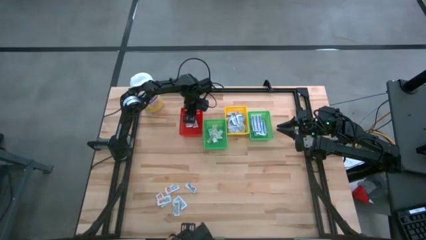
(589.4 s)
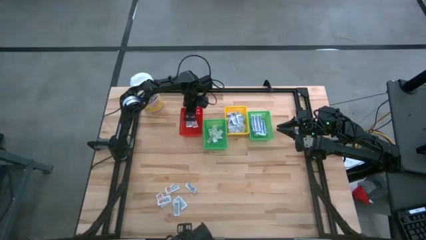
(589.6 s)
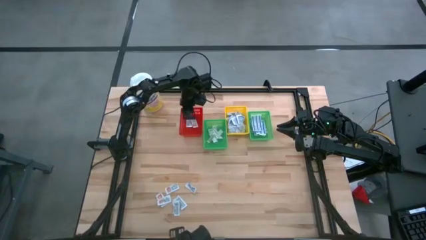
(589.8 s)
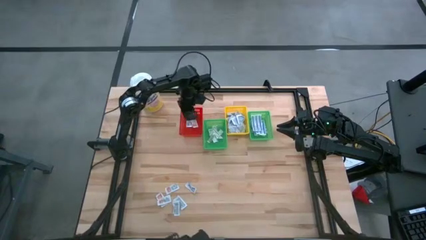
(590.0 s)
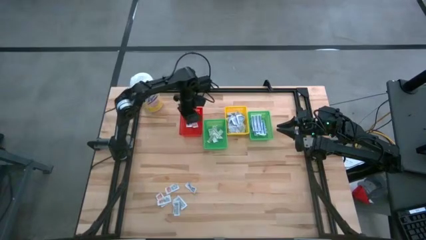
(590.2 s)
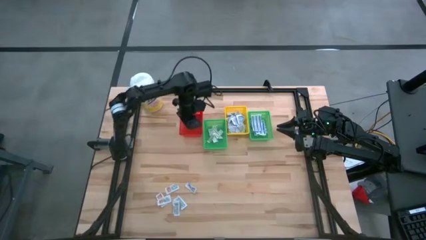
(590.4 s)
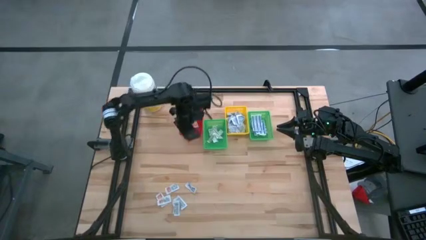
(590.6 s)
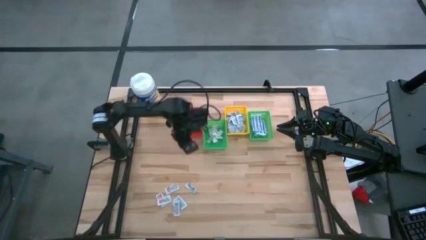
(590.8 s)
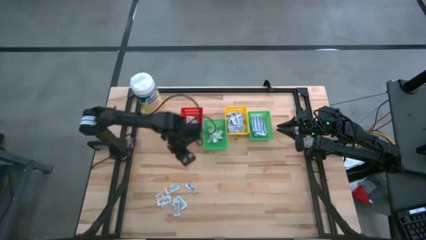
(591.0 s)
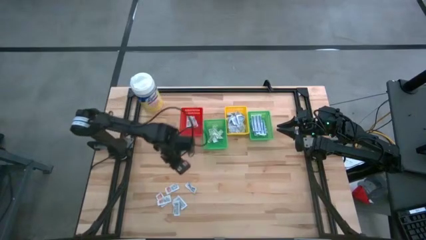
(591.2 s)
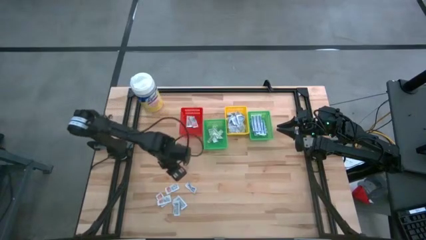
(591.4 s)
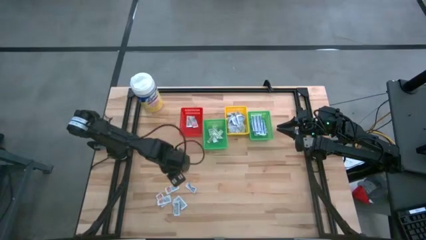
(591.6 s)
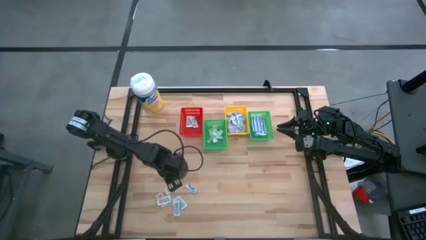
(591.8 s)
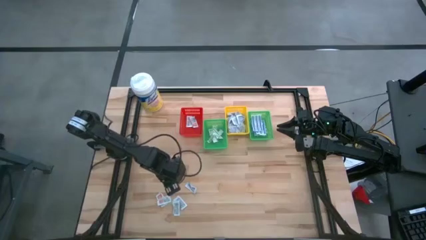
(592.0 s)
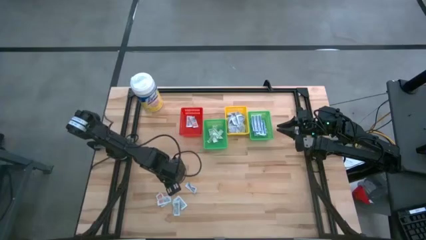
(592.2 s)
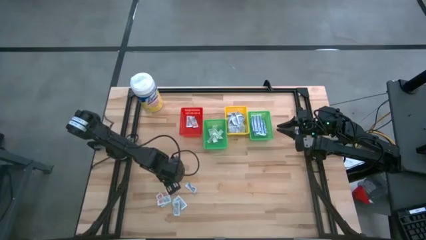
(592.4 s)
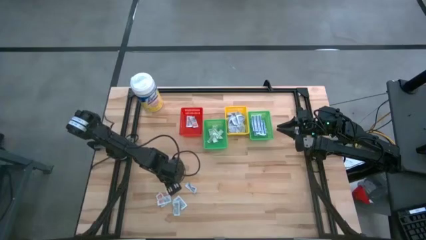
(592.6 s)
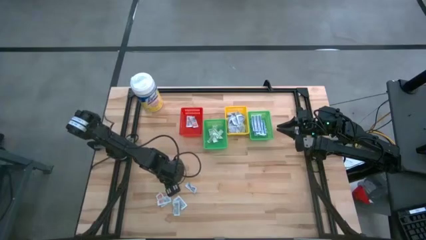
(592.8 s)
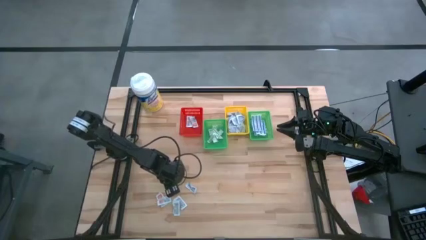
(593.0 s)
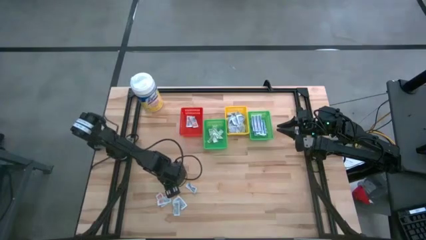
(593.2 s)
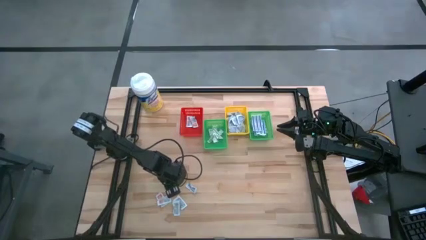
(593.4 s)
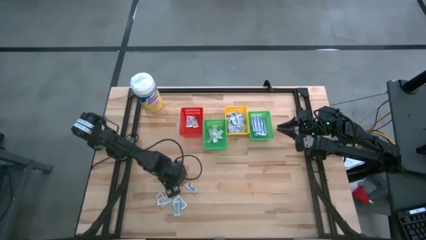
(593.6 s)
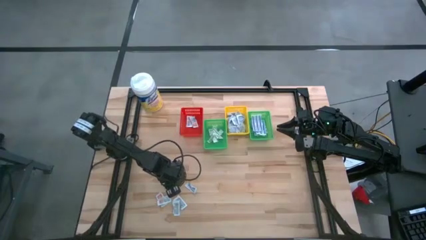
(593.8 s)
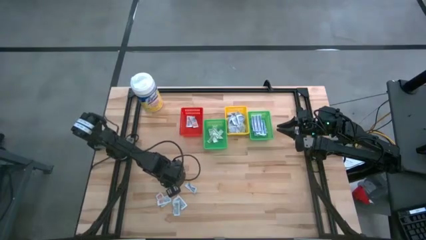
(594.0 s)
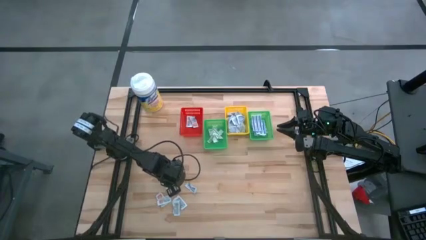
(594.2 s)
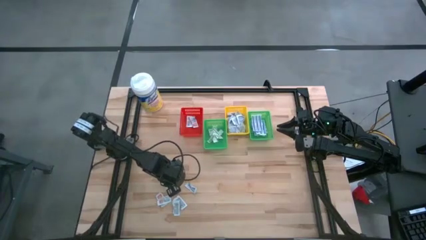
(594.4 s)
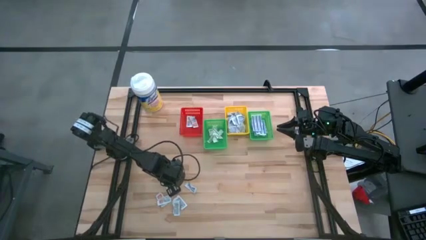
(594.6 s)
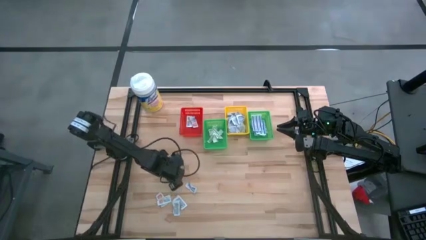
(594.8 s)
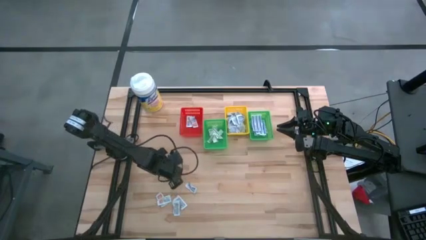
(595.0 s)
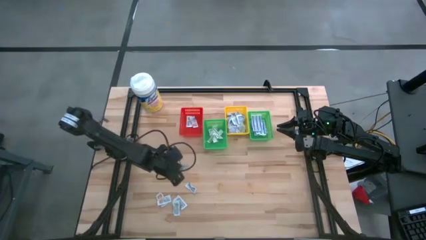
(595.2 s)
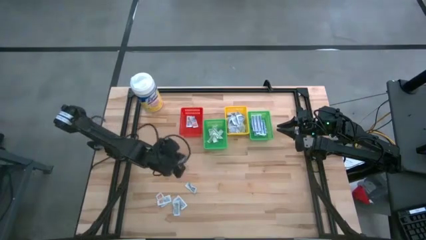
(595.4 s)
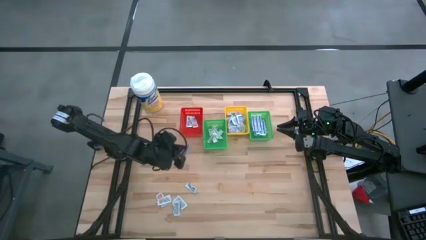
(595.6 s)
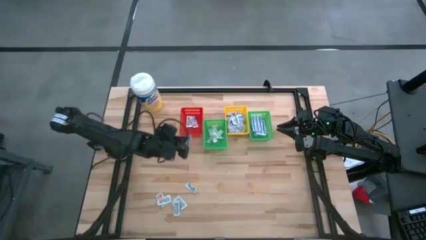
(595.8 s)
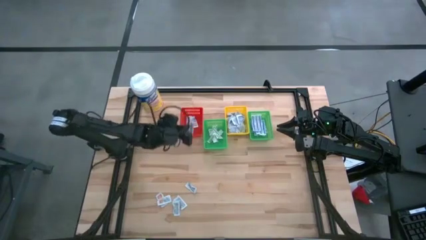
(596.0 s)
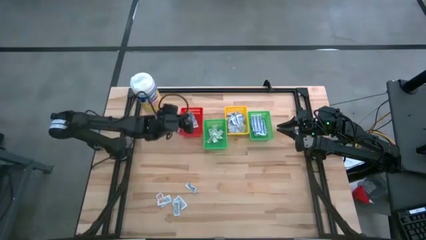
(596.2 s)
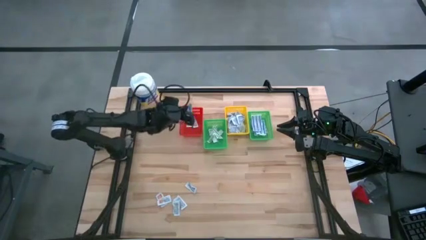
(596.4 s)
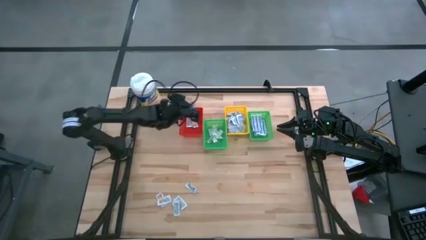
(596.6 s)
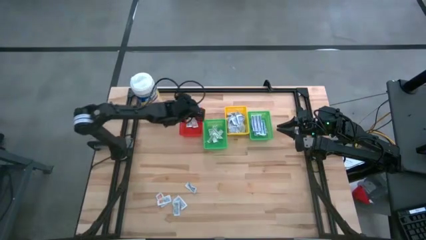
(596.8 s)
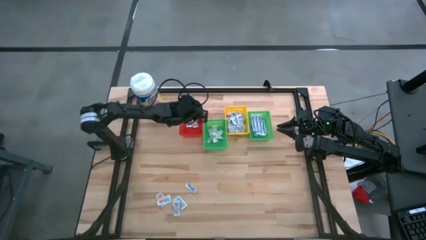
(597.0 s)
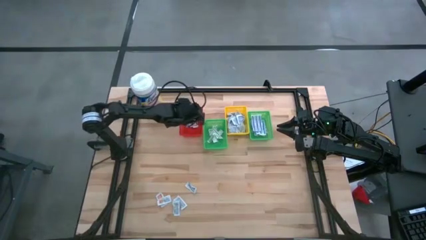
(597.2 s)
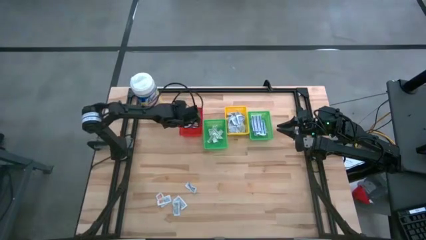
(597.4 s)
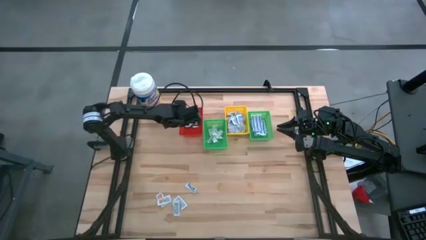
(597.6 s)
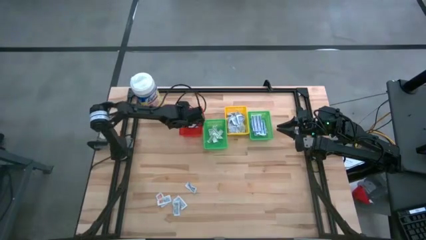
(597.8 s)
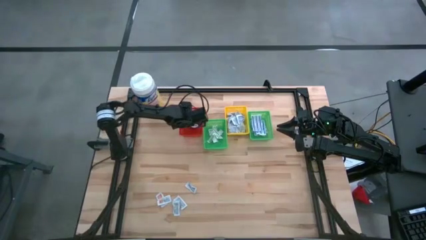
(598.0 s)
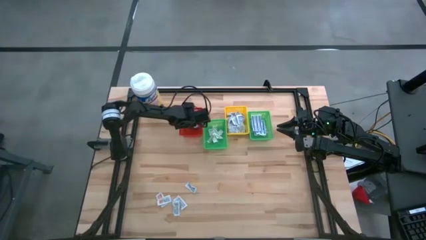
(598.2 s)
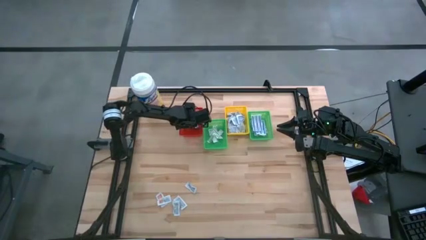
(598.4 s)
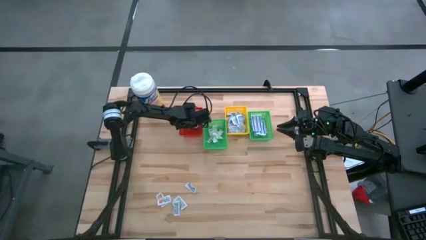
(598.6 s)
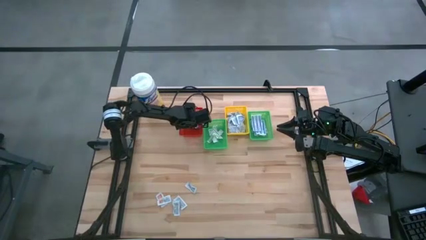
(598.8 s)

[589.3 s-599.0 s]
Task: Pick & Place First Aid Supplies
Put the ointment pack into the red basket

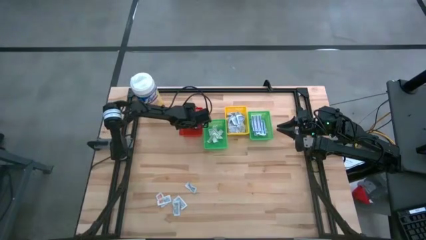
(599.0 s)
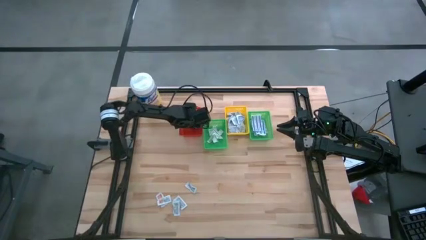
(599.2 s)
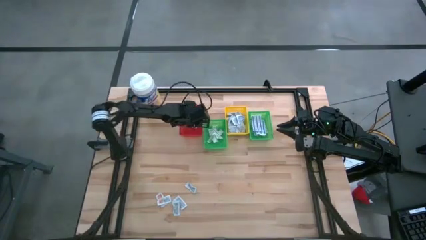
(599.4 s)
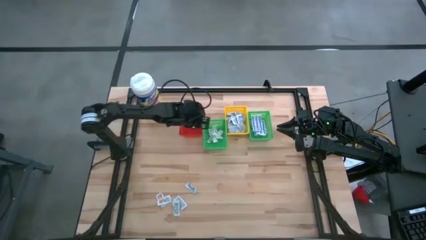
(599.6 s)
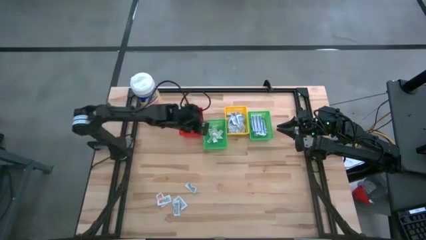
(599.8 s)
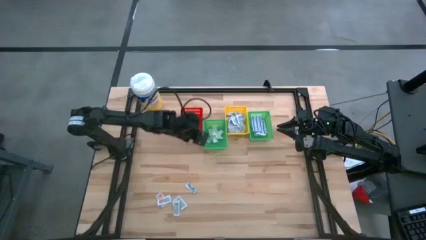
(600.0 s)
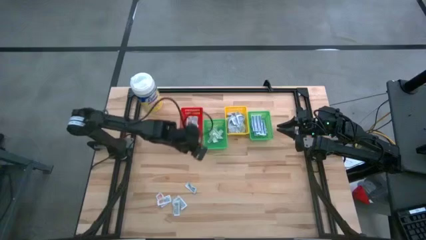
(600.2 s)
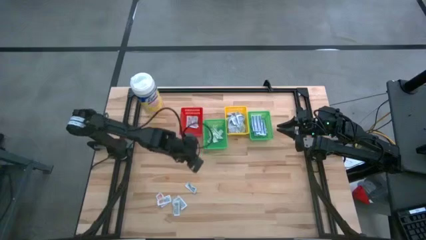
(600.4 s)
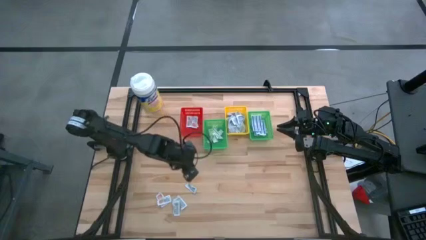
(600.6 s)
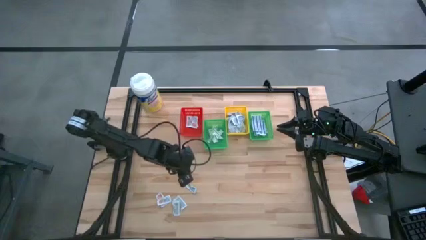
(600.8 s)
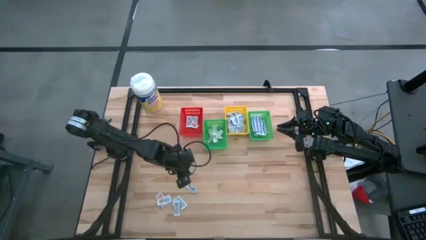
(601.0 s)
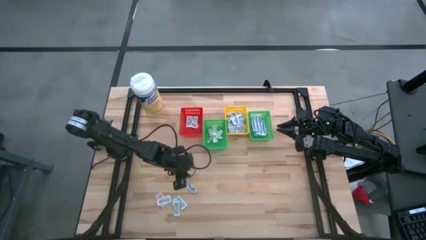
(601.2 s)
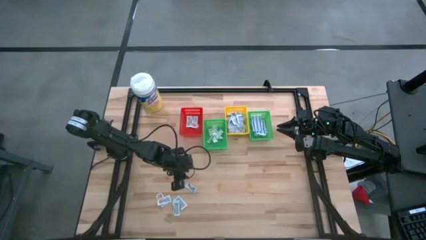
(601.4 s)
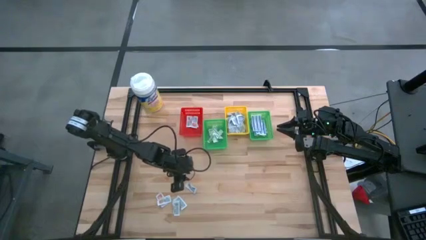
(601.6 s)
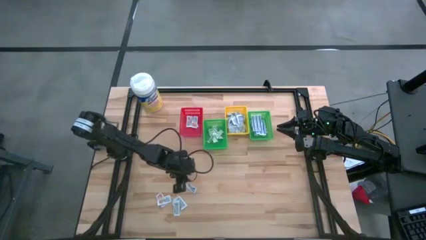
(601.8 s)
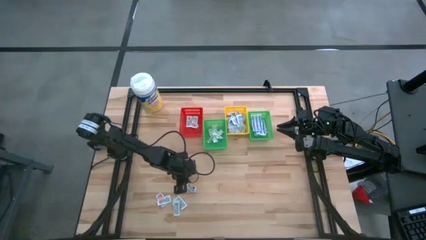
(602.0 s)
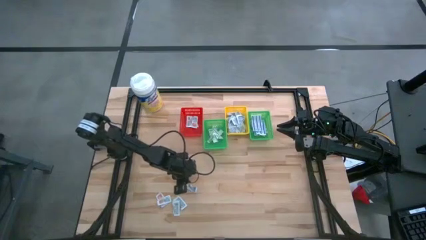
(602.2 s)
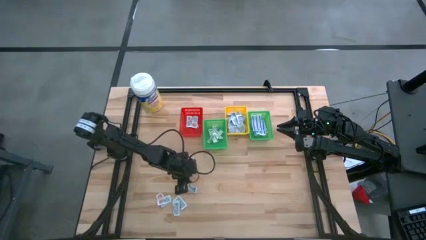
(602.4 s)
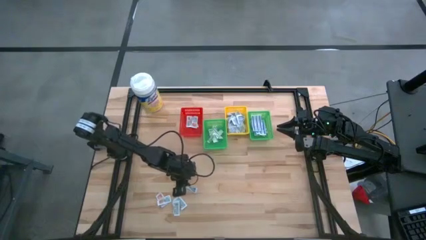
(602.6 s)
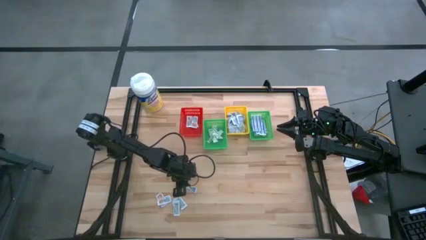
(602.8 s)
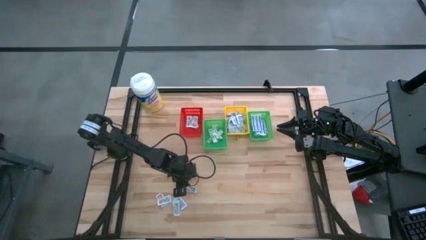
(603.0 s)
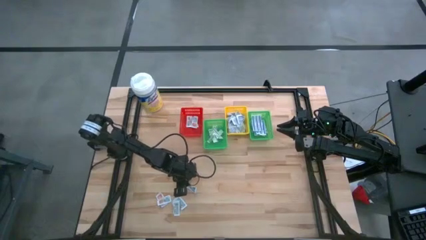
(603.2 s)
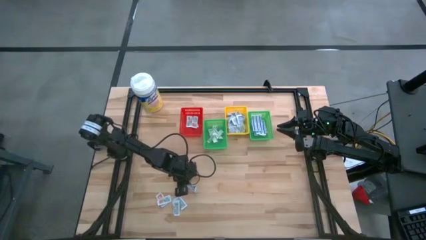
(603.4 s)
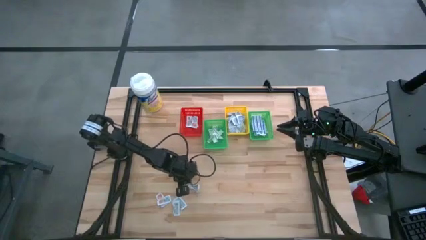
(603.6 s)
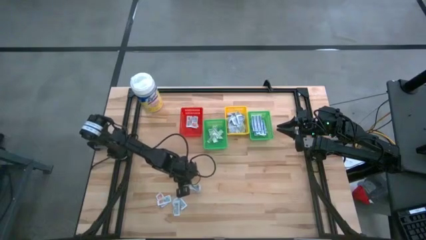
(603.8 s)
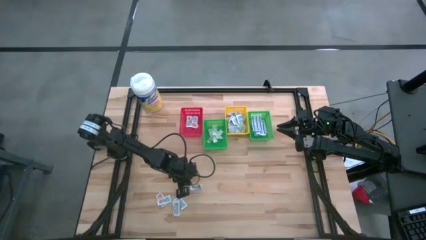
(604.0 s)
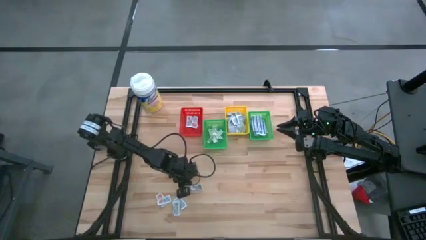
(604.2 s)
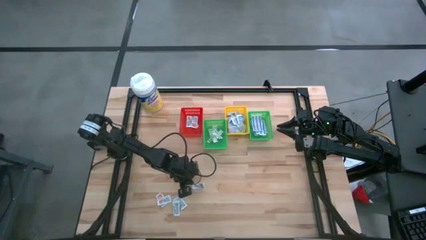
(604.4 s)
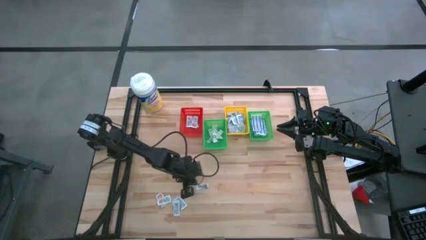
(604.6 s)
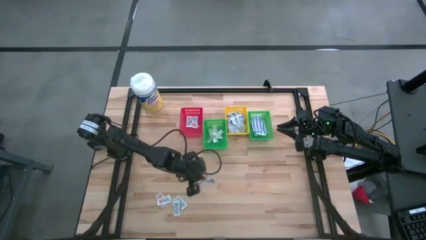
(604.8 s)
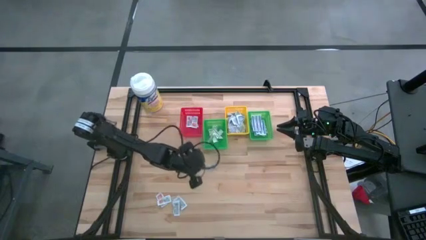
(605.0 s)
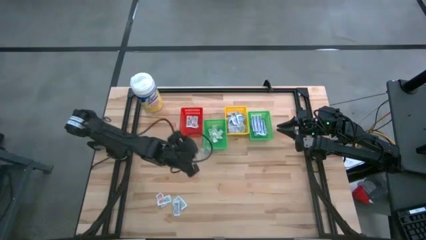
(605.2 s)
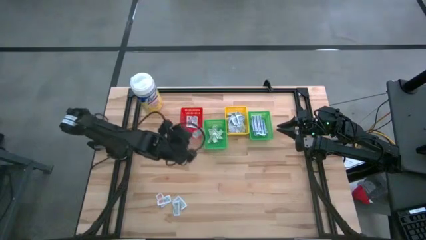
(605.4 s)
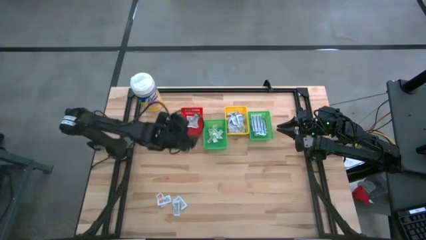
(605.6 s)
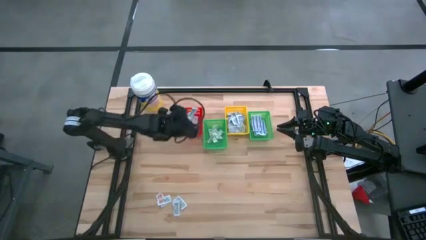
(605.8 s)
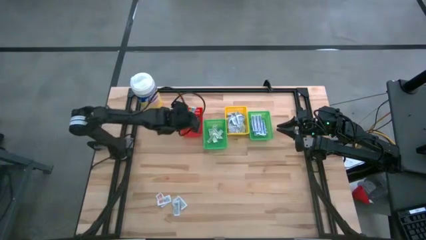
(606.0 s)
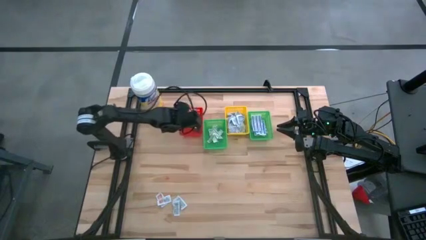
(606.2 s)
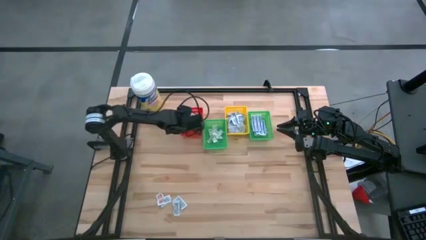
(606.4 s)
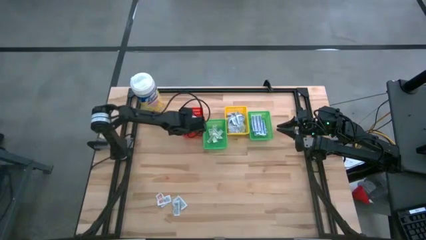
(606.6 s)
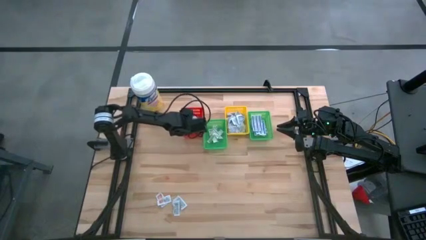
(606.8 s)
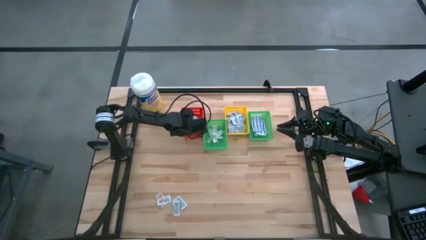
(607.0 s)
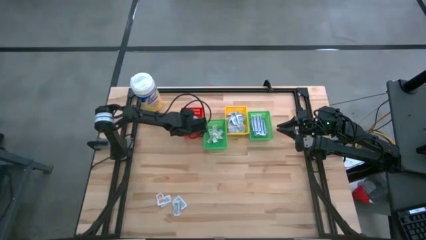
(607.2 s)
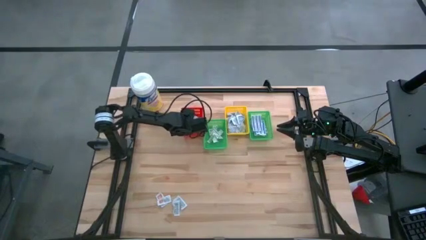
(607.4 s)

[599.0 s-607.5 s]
Put the ointment pack into the red basket
